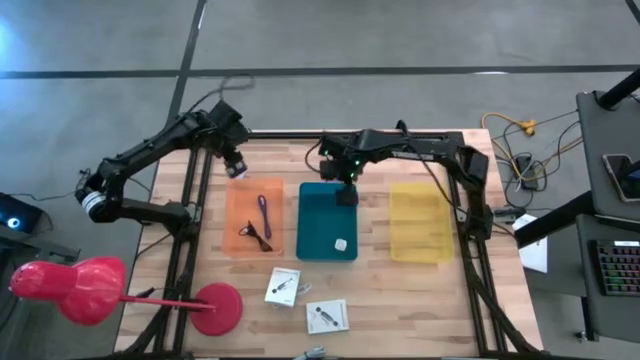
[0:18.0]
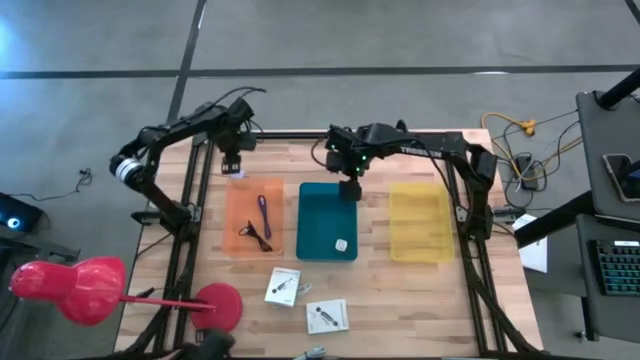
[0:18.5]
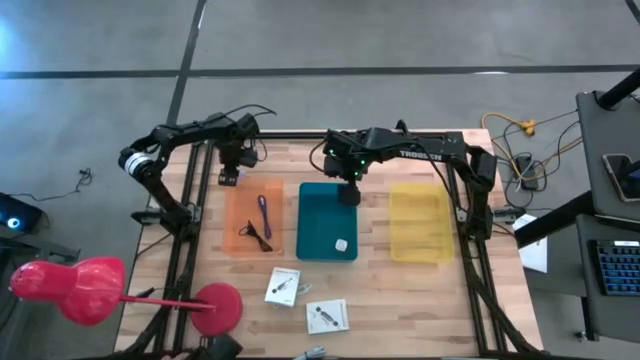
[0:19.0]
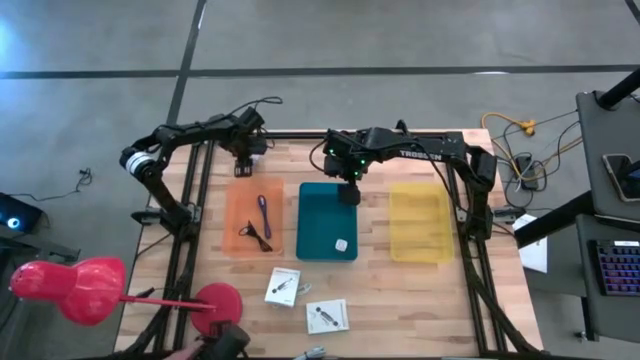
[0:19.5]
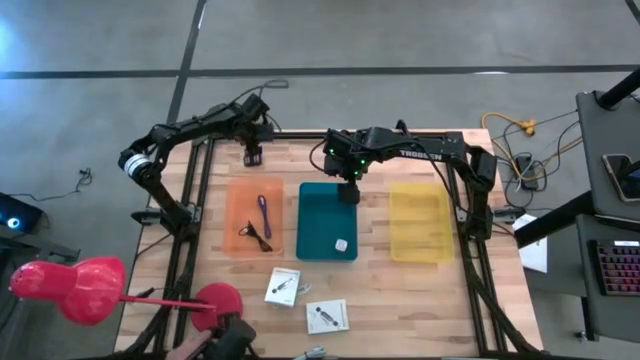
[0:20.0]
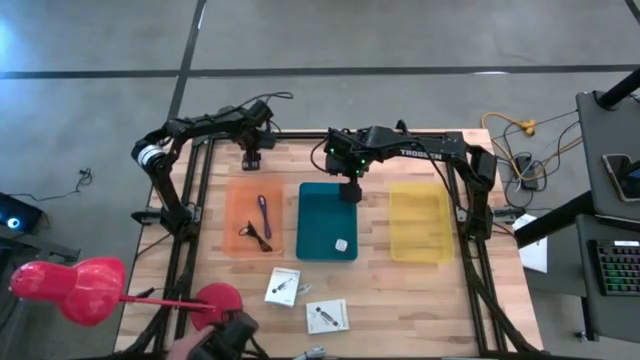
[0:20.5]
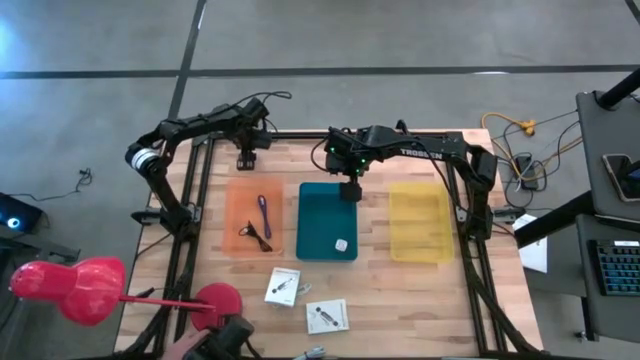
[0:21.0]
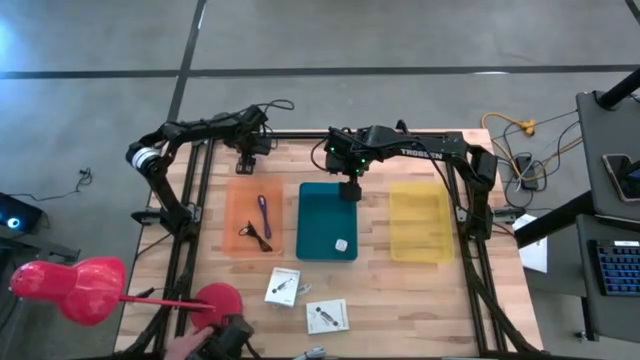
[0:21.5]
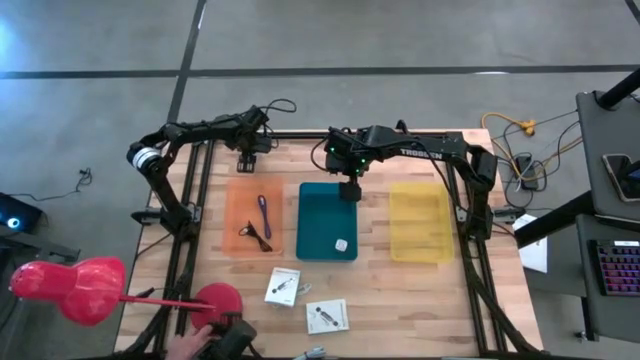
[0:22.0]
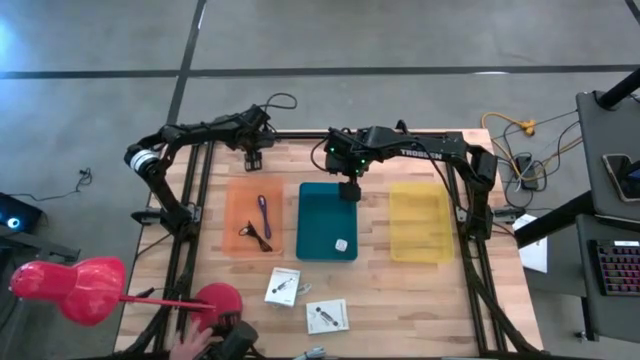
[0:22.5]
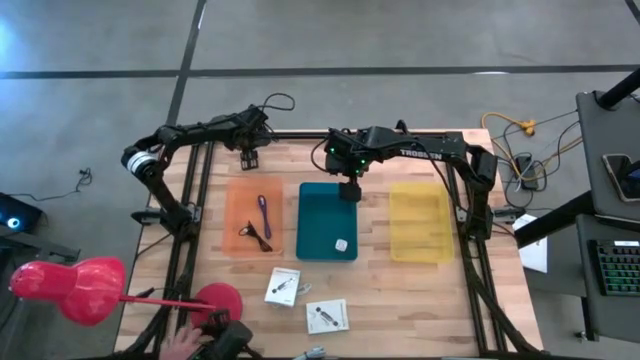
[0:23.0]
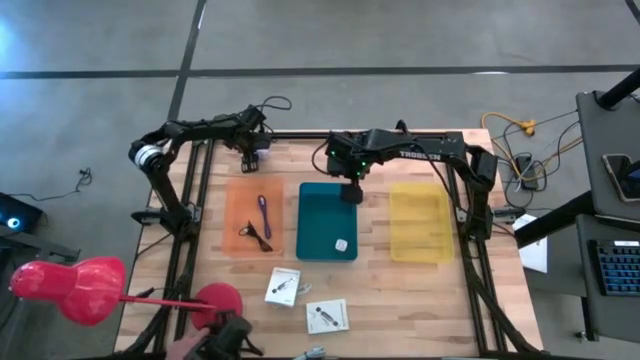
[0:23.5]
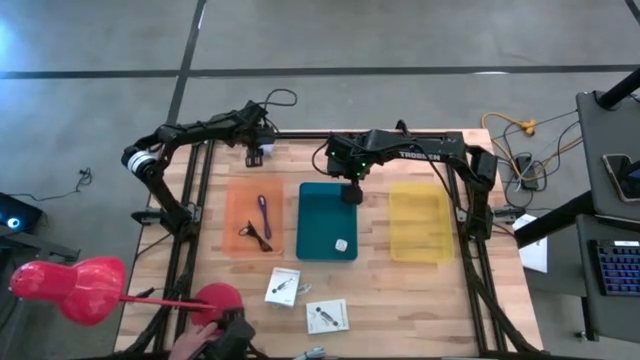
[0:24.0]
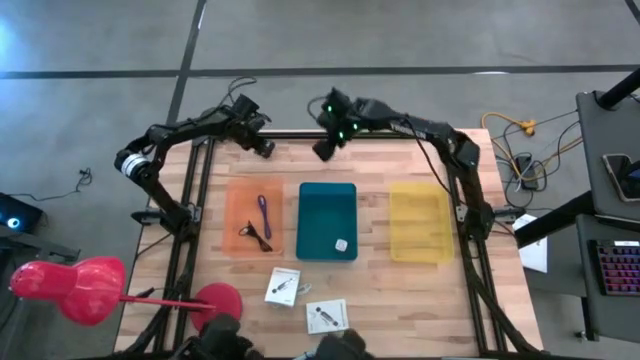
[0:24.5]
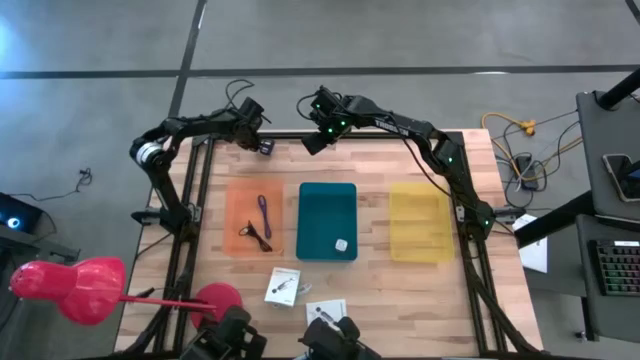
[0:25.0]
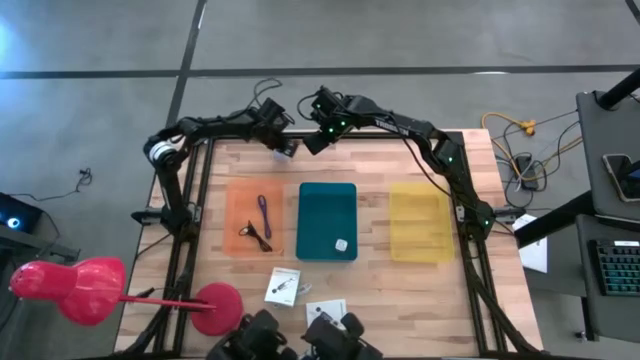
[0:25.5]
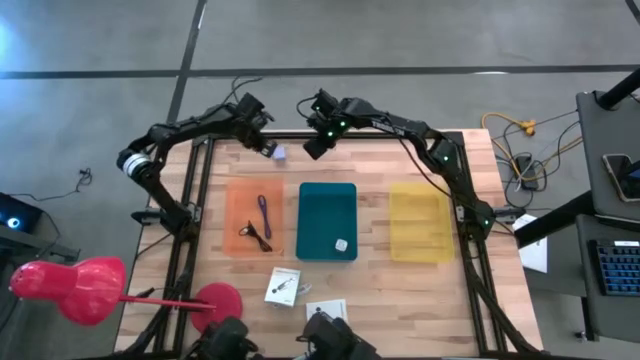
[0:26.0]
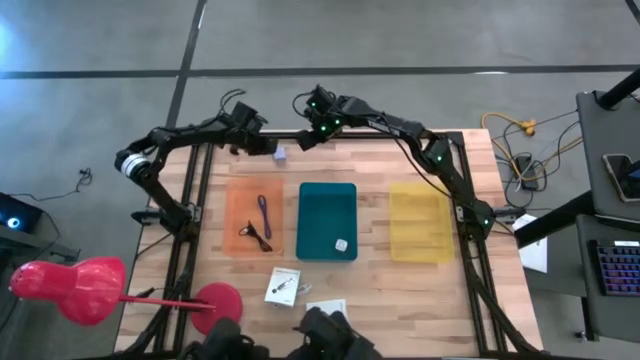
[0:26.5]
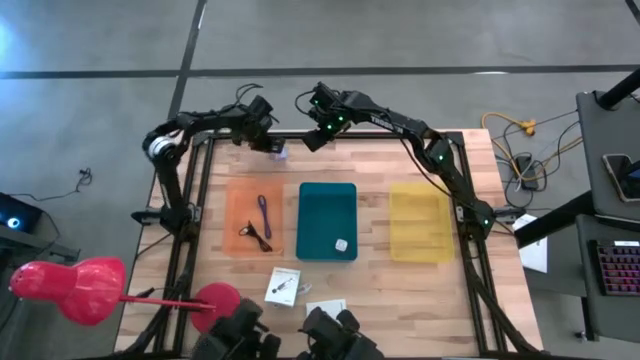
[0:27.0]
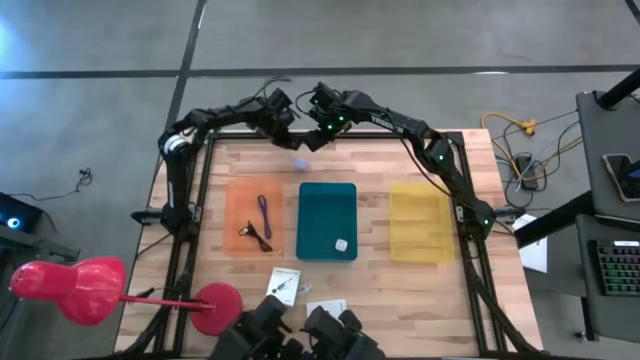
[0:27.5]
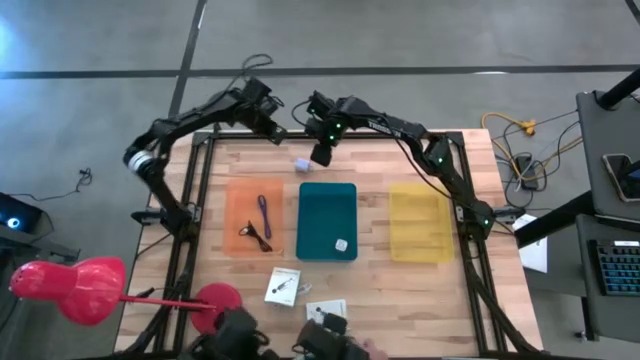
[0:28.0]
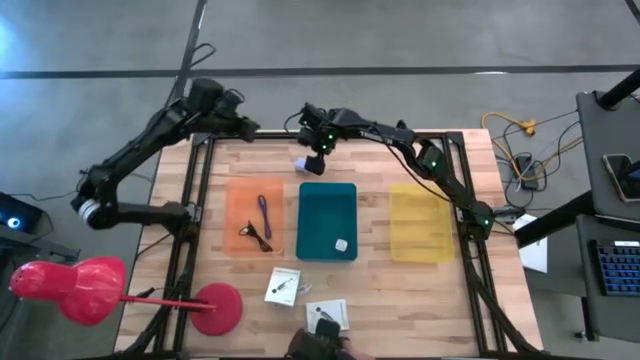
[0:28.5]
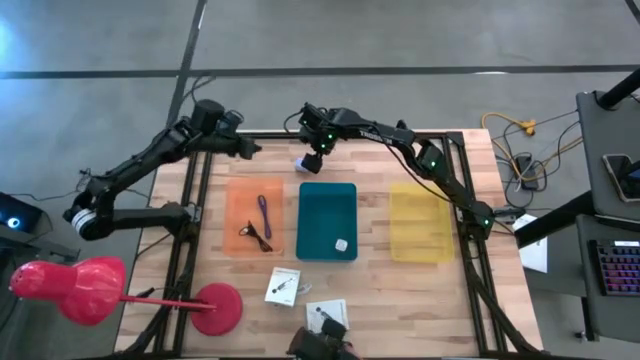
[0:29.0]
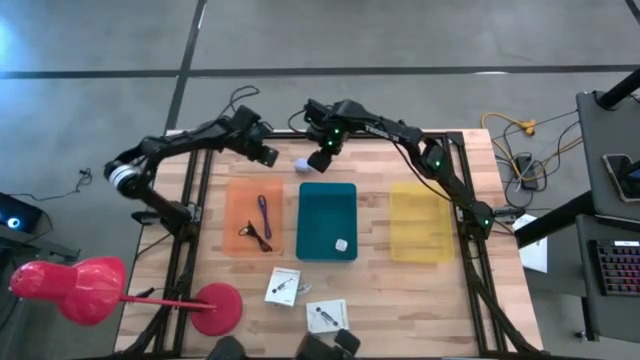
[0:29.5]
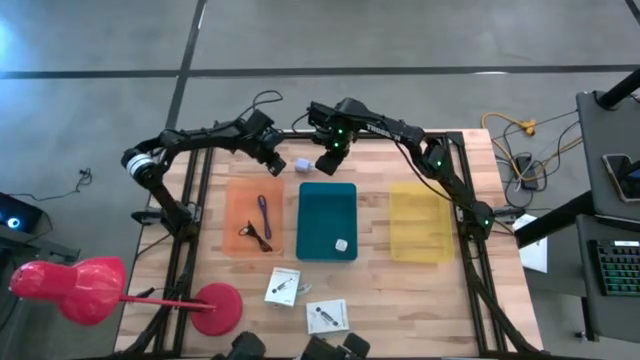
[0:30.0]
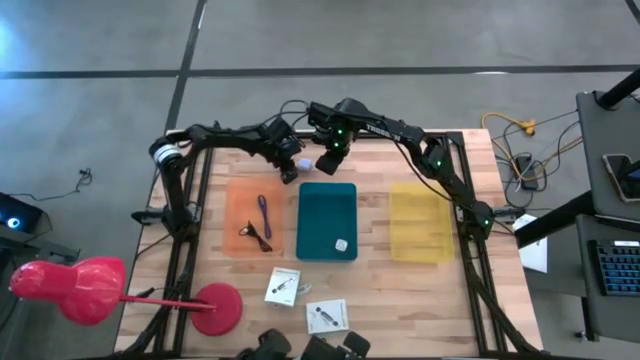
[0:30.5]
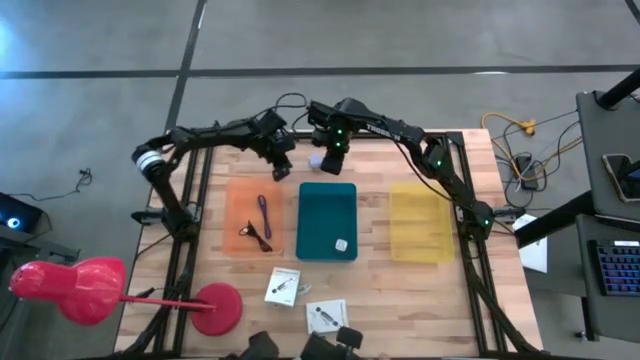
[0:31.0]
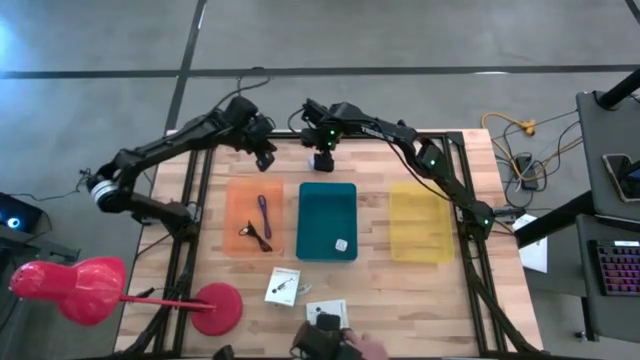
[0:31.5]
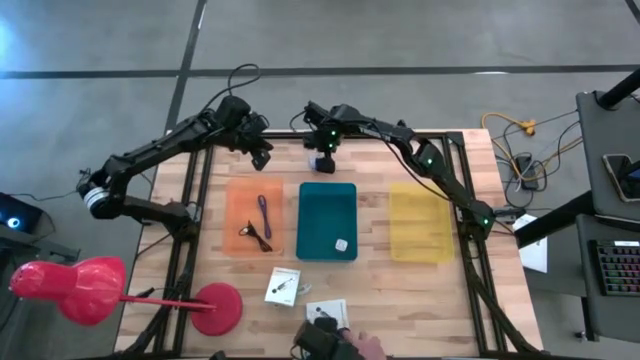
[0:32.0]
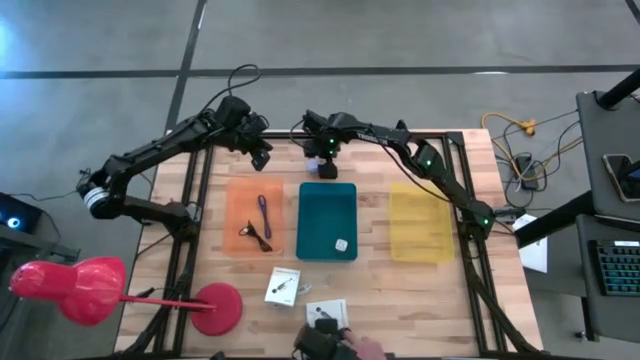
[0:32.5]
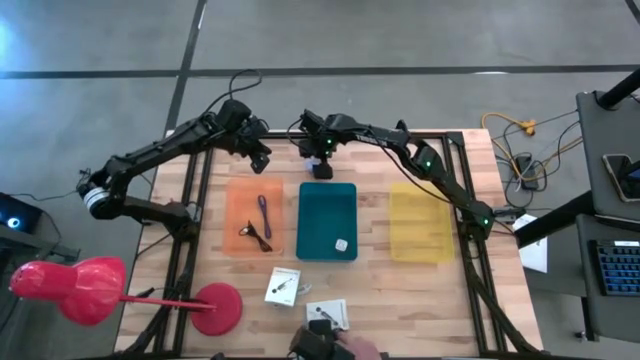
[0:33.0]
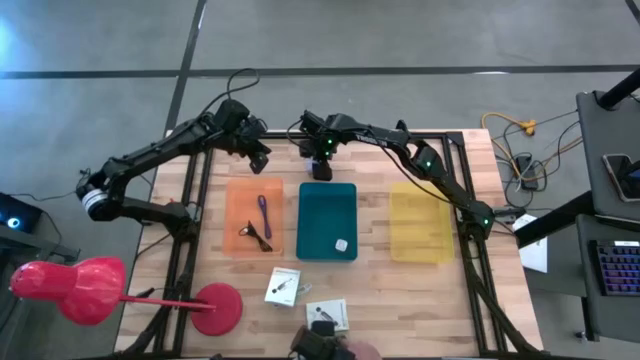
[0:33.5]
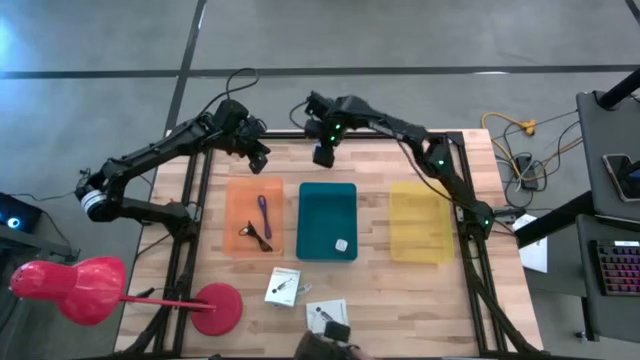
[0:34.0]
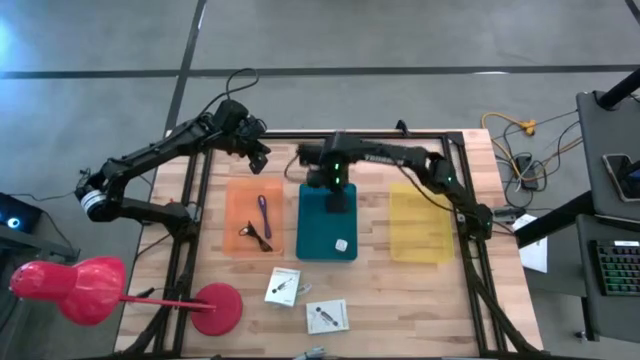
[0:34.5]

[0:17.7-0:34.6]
Task: Pick and place items into bin
Put the white adapter charger into the blue bin

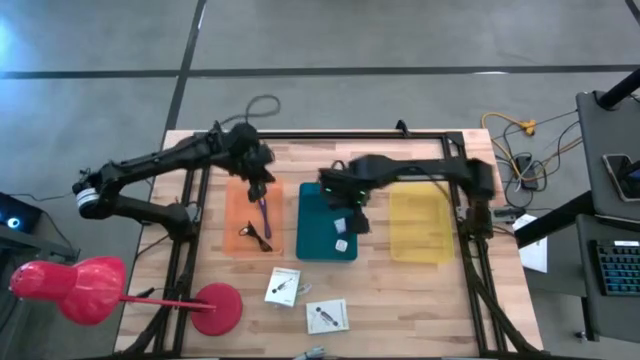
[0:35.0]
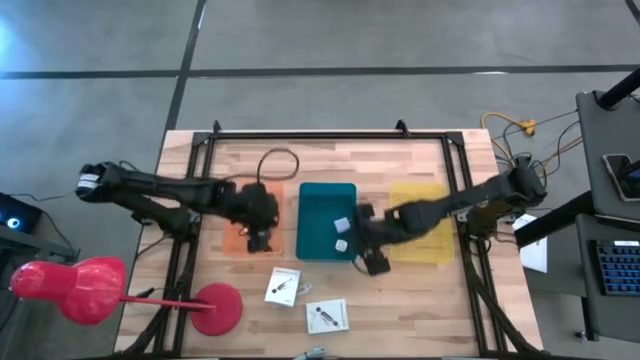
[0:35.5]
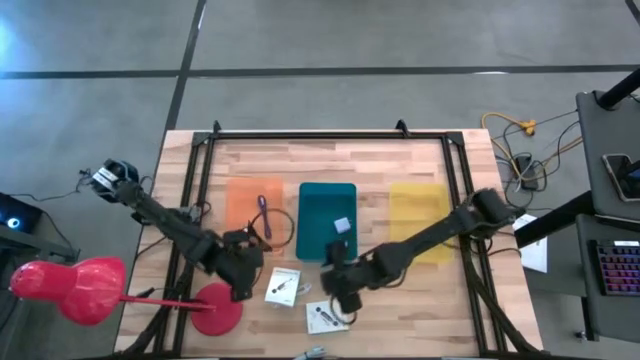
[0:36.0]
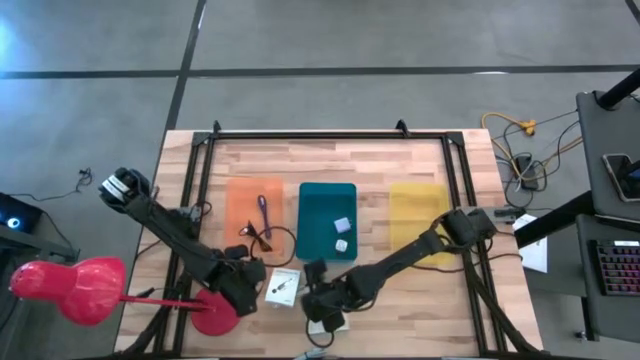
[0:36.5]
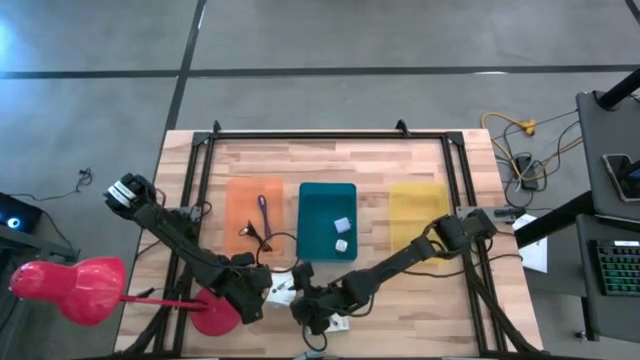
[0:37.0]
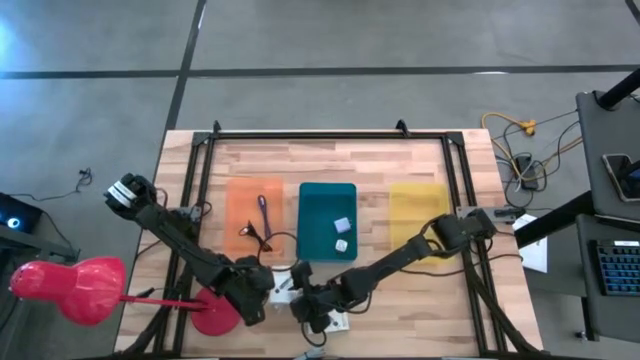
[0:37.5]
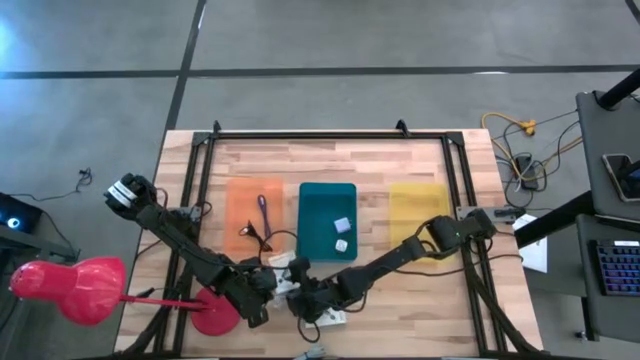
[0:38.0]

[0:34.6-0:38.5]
Put the top card reader box into the yellow bin

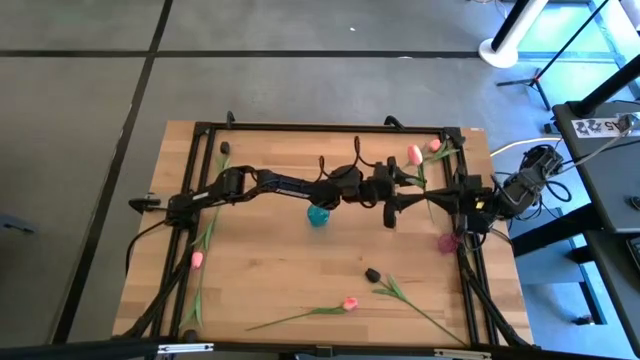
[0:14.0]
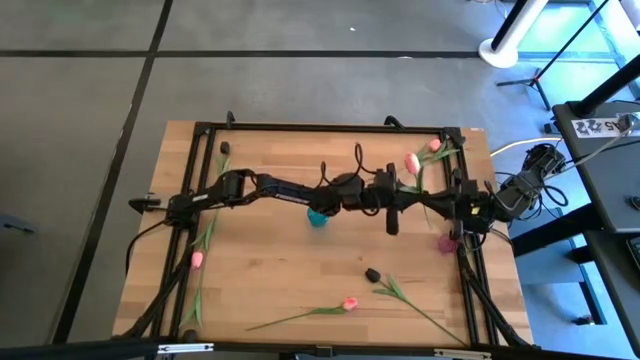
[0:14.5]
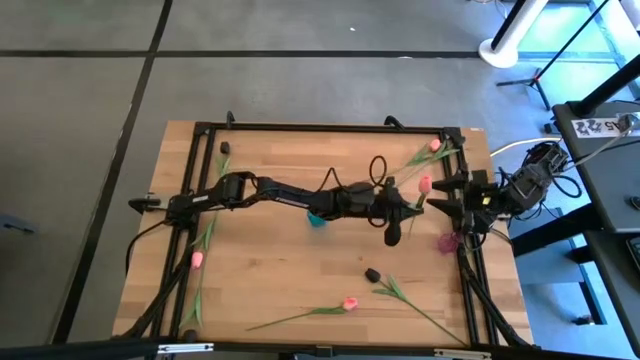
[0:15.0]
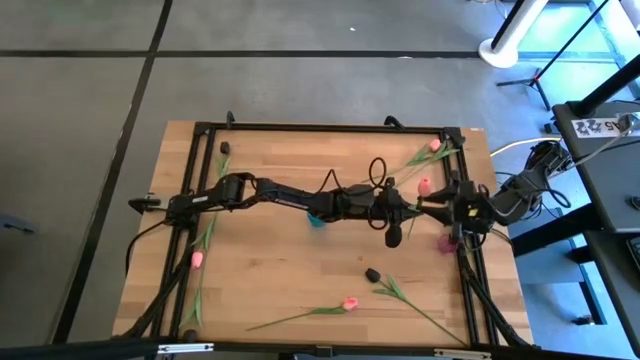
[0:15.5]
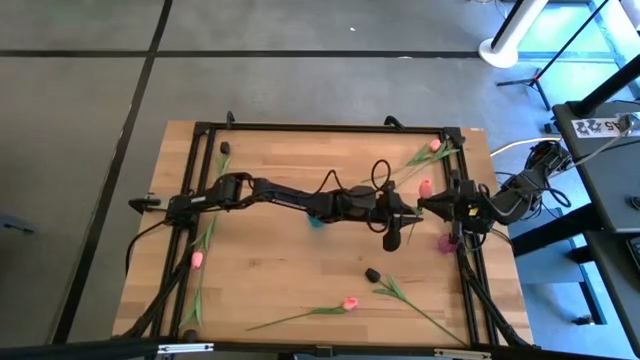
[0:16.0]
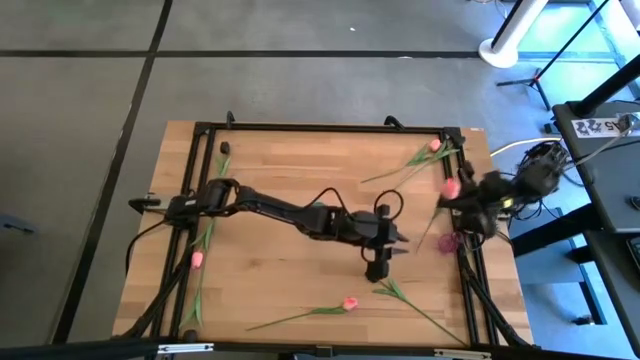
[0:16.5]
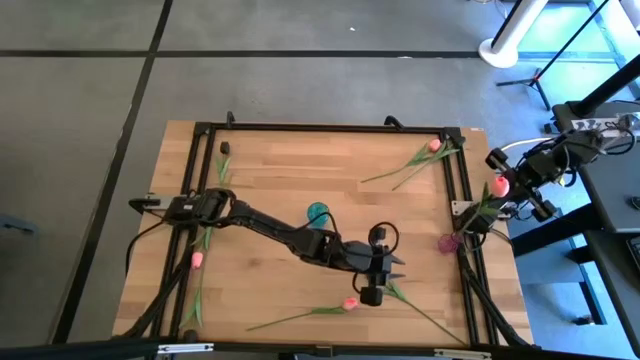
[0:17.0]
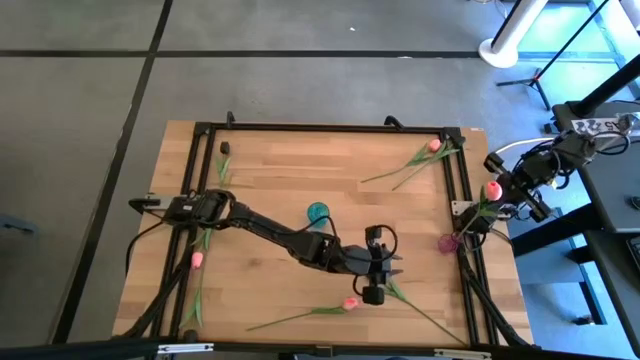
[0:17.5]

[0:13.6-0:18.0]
Task: Sort flowers into vase by color
Put the pink tulip into the purple vase
